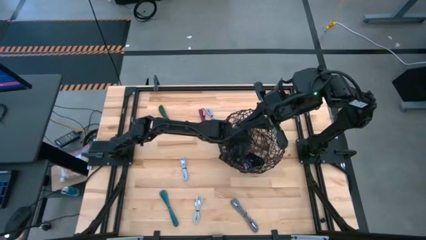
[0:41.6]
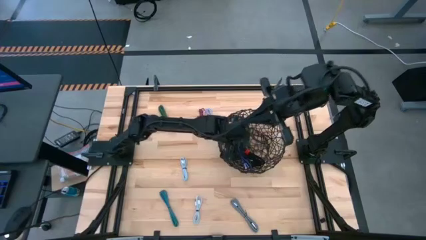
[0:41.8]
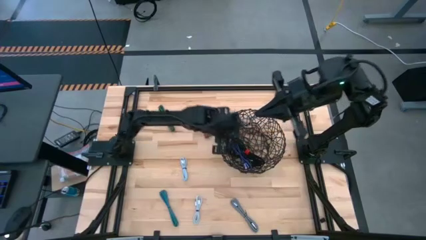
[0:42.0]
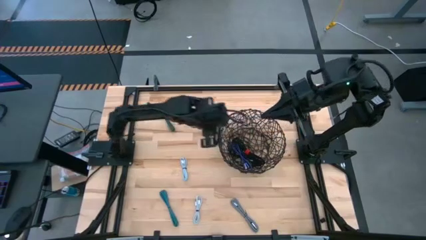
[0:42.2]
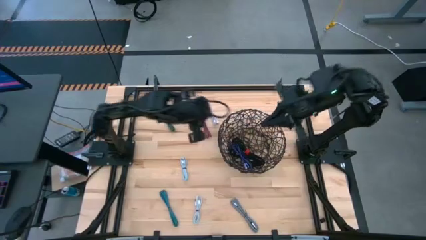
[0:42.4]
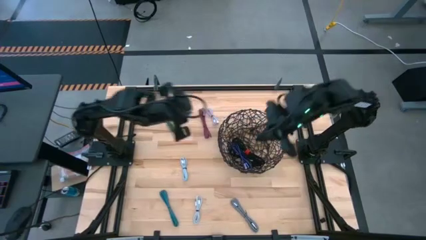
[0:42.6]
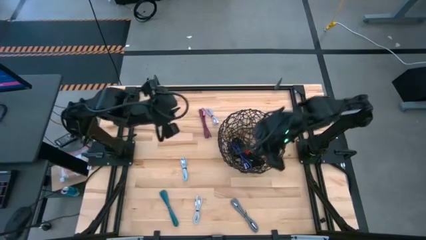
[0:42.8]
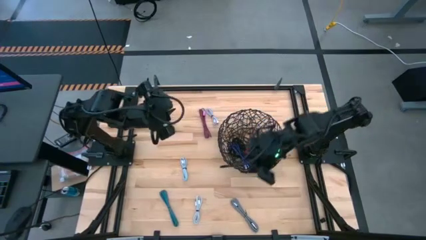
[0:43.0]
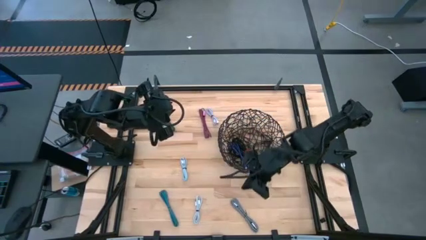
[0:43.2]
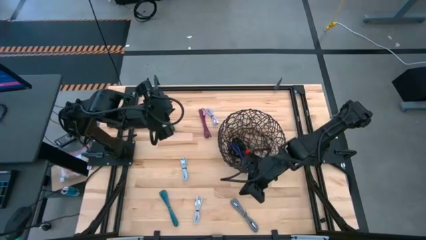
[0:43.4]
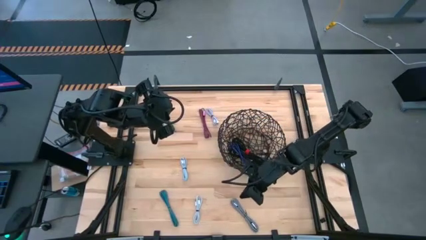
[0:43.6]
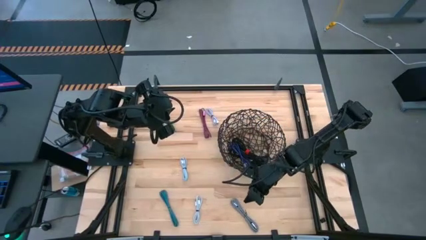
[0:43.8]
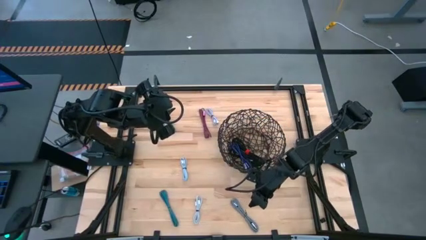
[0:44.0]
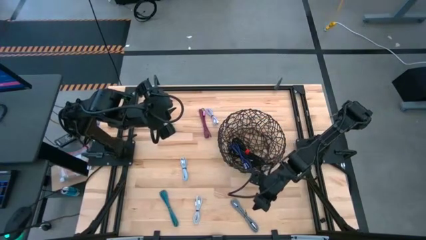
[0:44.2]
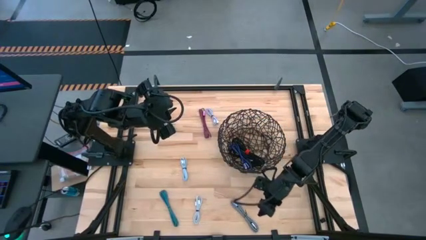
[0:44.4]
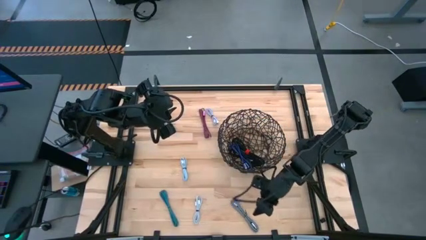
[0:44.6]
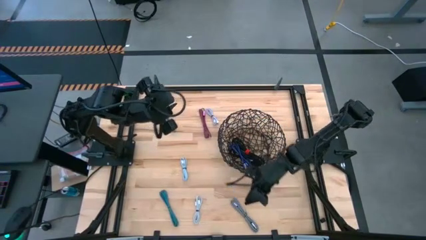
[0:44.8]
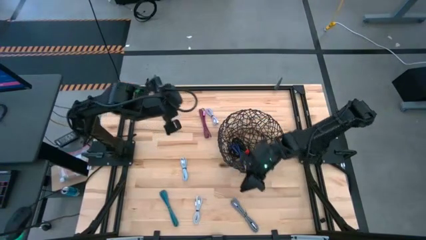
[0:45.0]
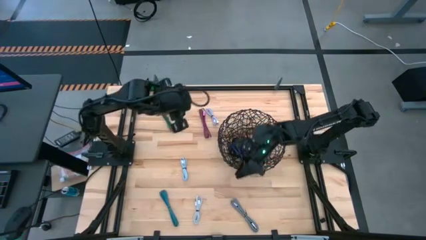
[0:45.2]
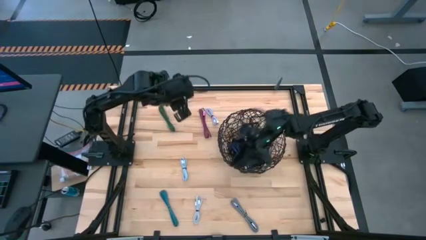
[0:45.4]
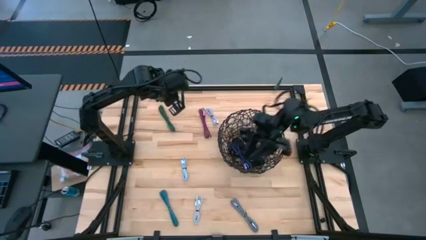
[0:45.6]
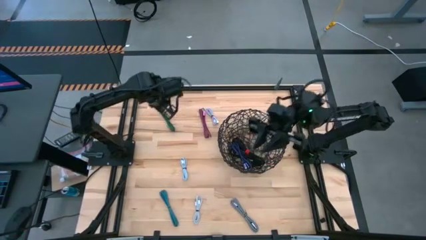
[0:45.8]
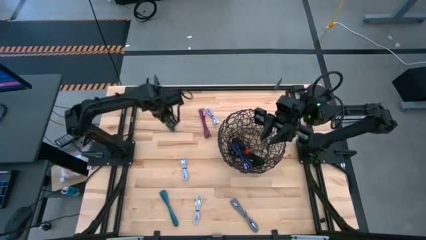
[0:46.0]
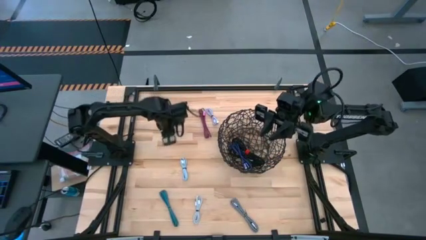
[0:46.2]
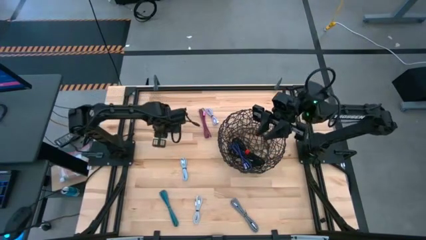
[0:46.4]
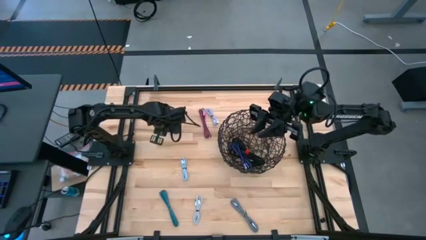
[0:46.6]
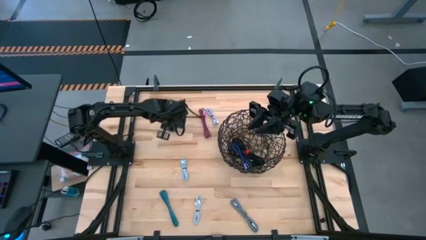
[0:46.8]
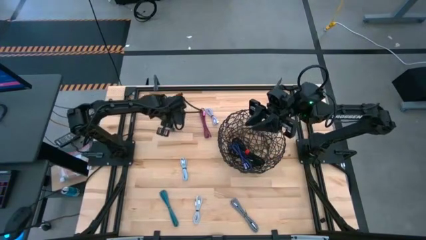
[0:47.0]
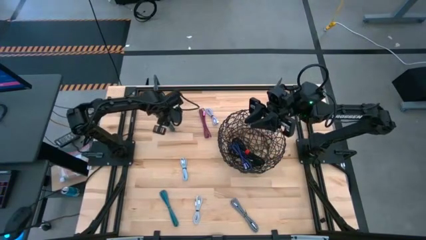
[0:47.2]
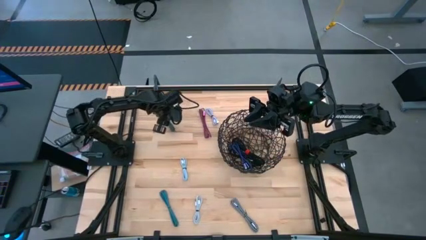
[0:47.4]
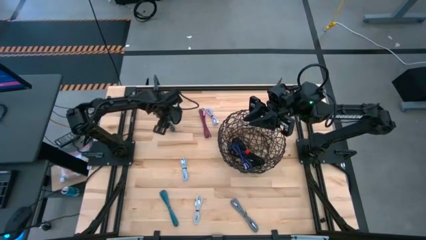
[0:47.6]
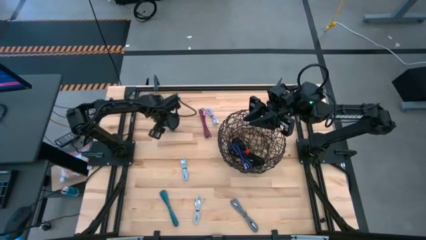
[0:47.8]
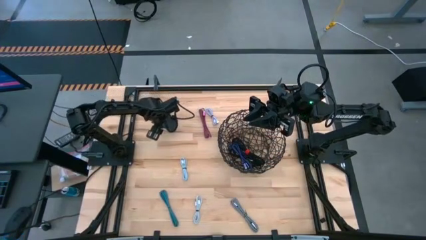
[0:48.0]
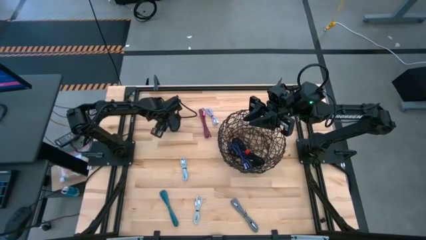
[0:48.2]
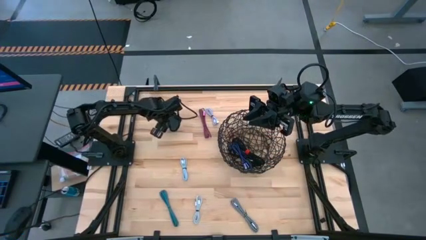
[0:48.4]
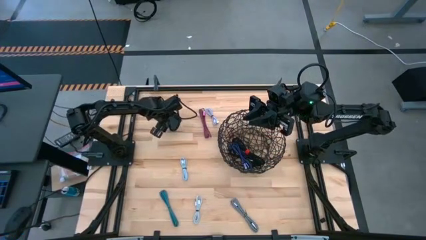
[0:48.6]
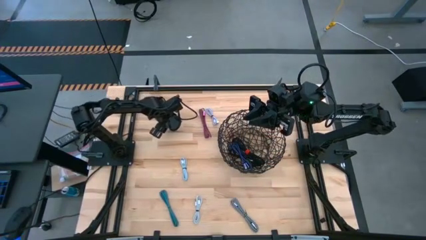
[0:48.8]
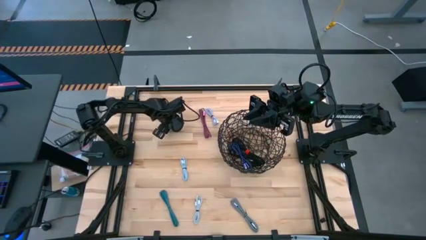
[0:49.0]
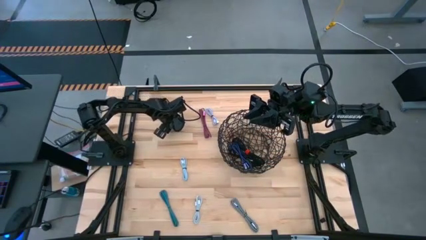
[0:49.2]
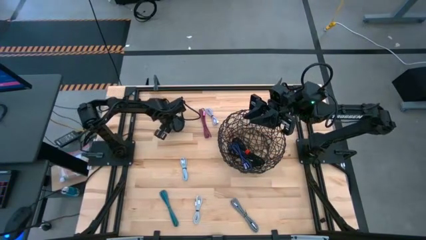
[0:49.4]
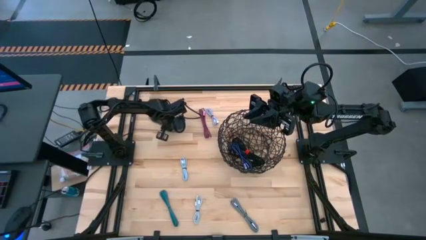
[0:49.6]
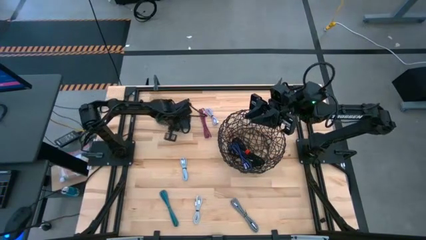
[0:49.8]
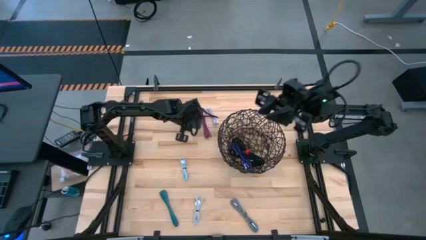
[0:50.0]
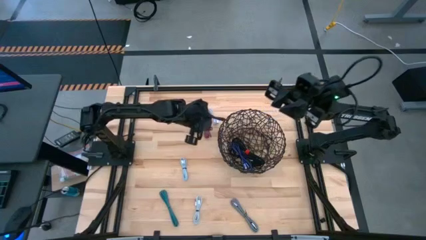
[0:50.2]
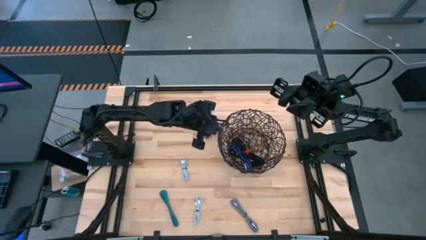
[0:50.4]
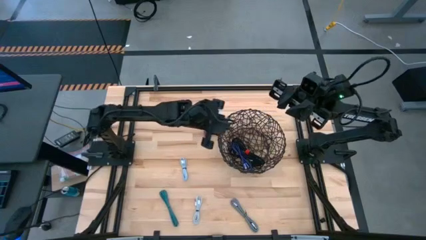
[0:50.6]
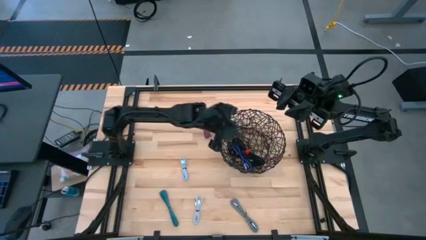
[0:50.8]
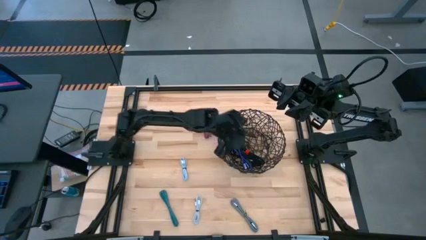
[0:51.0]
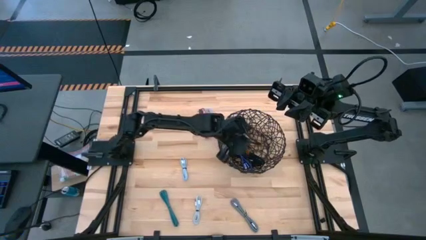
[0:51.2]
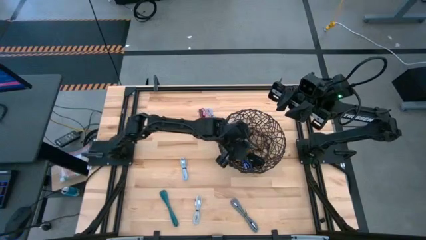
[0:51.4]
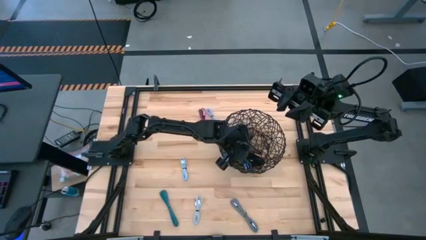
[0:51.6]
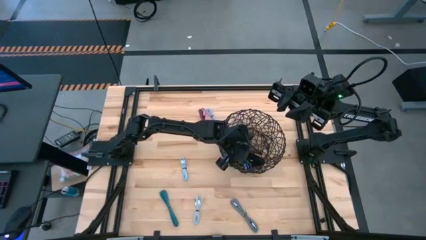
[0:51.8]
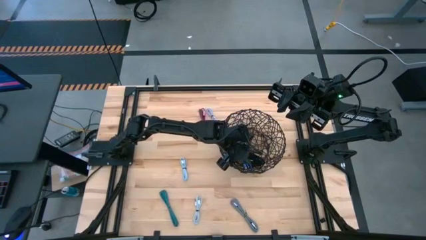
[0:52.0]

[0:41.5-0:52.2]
Task: Pick and place USB-C Cables
Put the green charger cable into the black wire basket

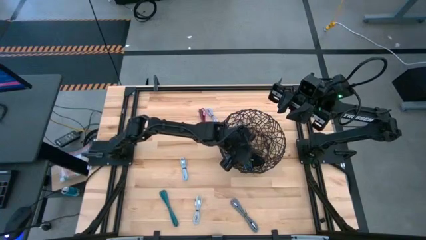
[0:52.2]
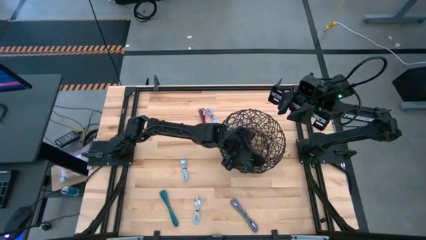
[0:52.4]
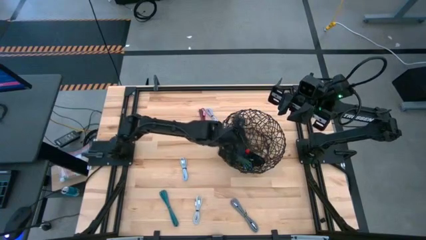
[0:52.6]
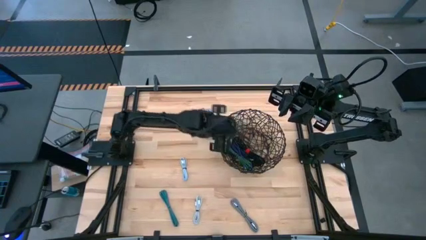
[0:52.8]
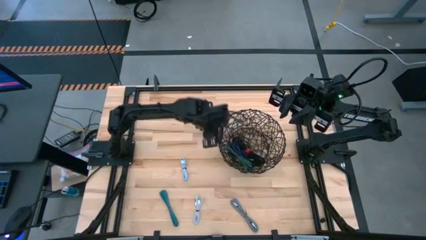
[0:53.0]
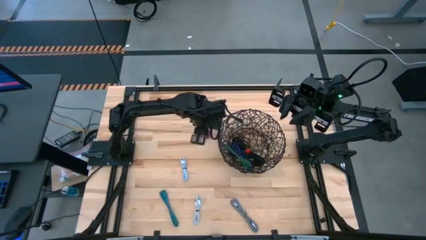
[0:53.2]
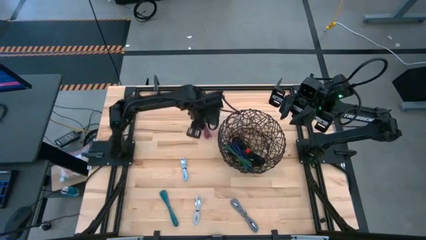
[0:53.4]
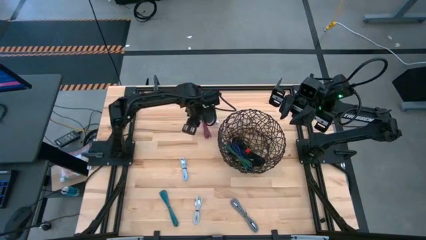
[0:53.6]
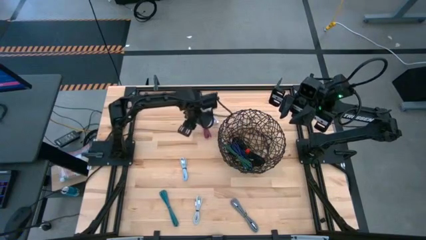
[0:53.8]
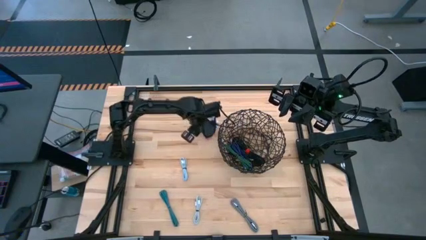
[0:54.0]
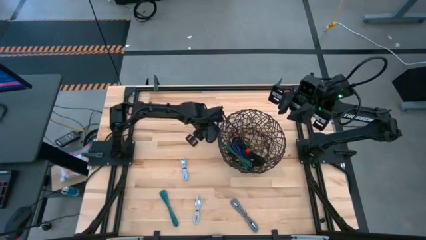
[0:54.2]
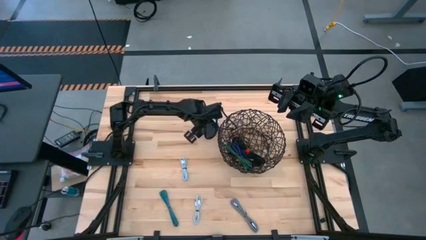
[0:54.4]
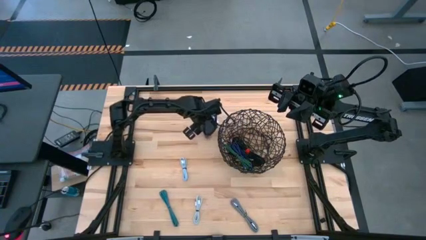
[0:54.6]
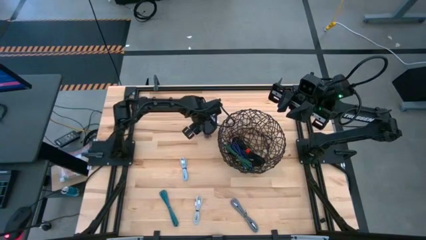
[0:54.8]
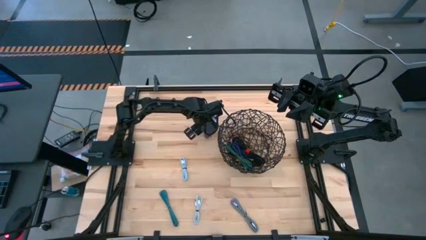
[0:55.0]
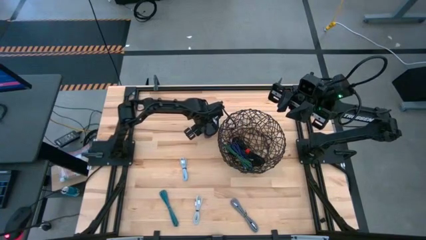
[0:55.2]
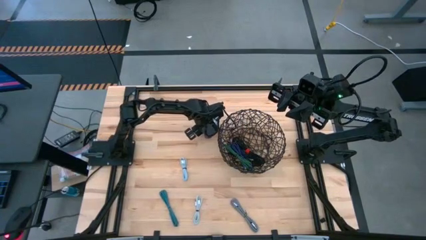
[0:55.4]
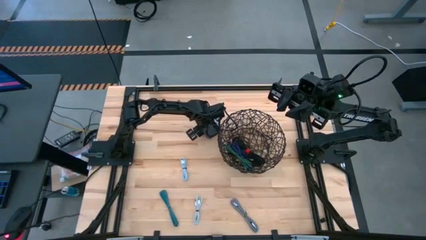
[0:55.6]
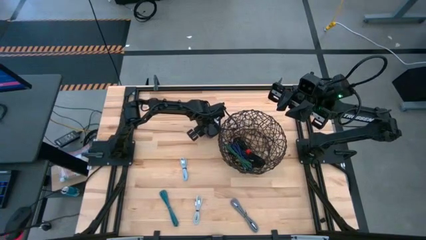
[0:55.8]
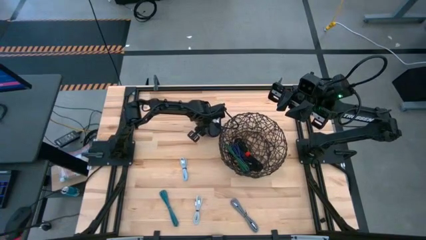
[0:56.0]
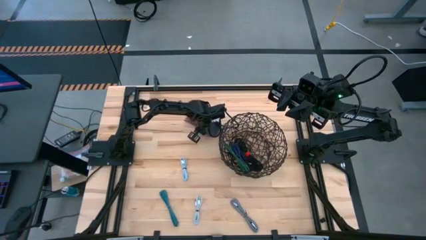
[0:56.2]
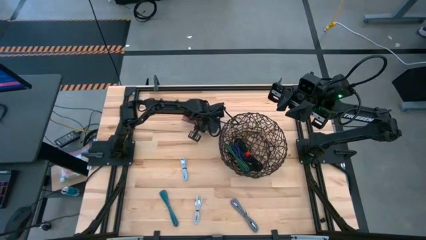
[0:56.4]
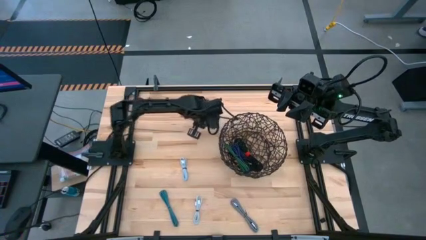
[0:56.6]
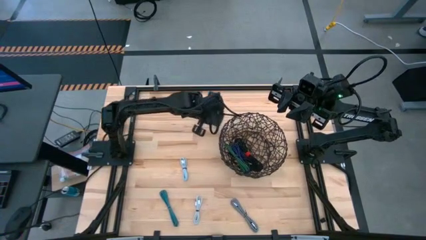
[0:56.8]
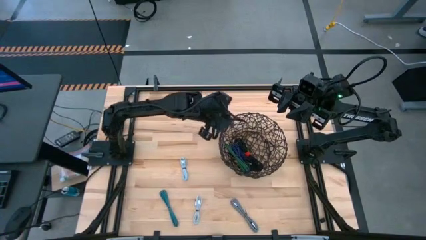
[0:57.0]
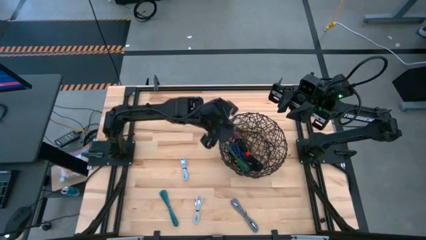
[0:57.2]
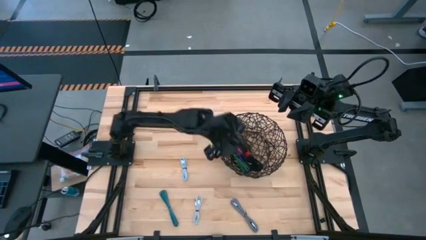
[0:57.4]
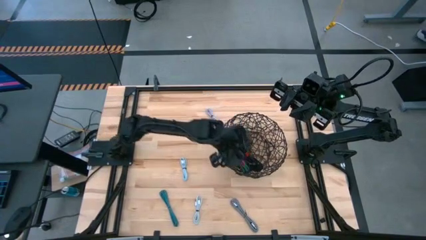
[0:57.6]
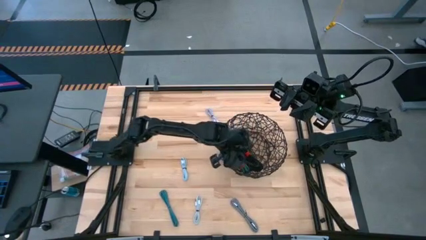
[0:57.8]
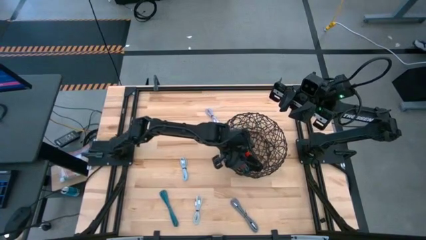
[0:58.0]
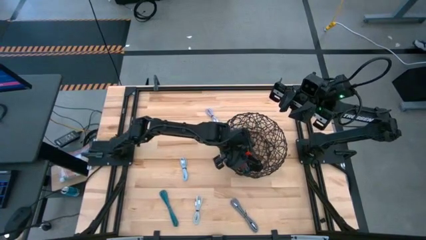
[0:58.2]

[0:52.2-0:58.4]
Put the pink charger cable into the black wire basket

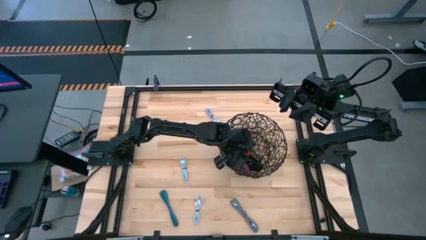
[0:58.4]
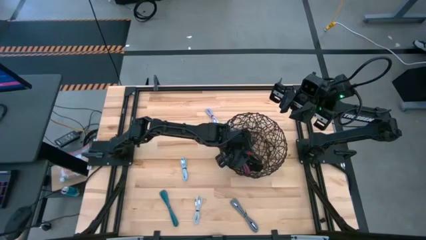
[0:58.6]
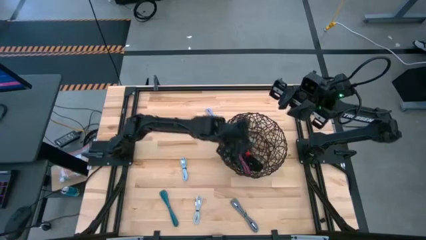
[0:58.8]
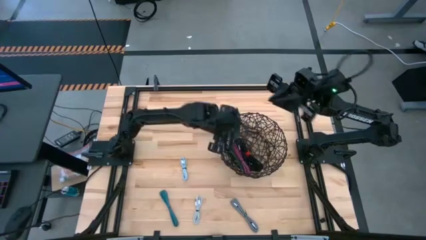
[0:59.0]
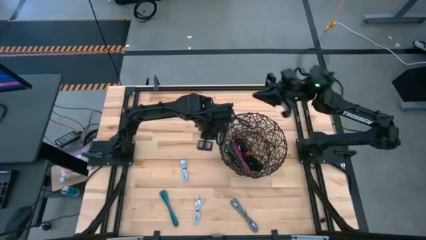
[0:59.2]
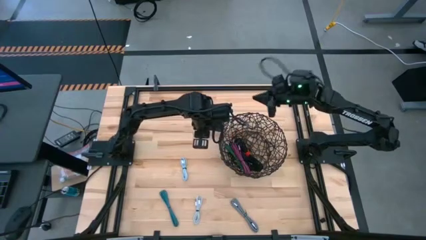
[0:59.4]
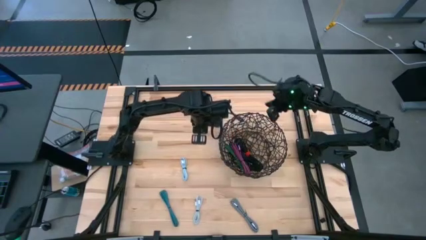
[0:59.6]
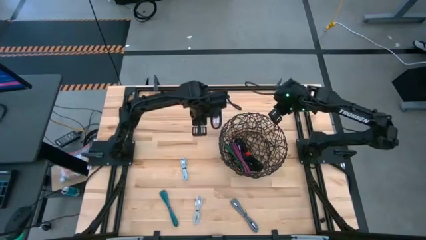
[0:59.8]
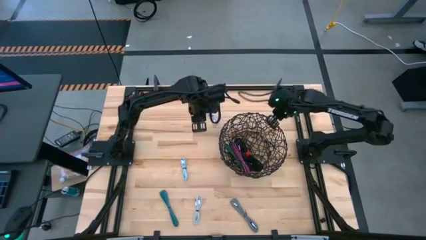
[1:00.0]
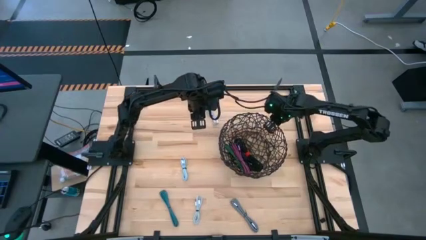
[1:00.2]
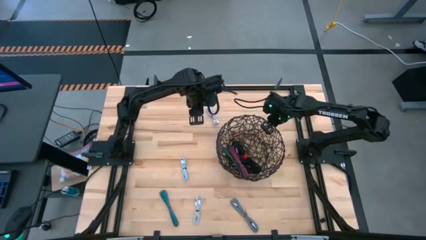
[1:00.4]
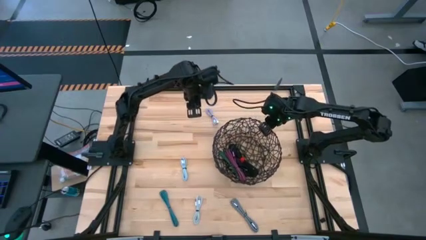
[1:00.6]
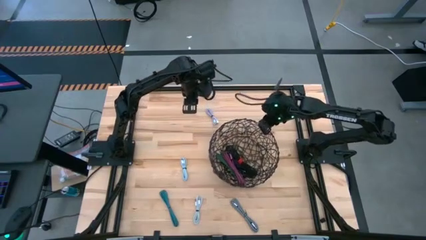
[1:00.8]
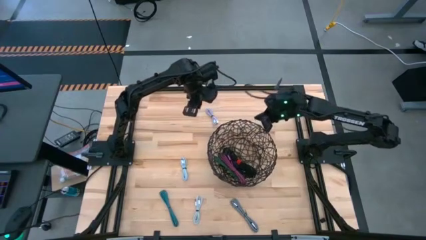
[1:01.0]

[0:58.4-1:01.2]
Adjust the black wire basket on the table
